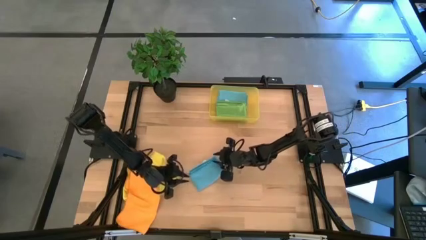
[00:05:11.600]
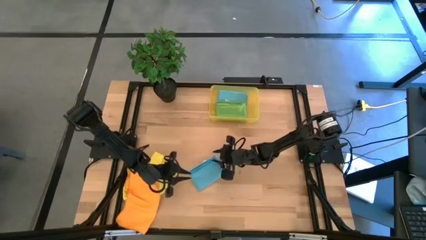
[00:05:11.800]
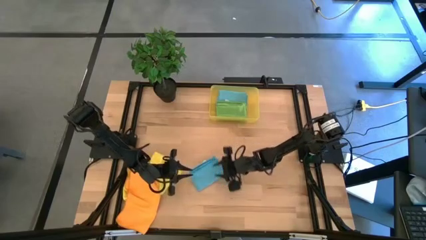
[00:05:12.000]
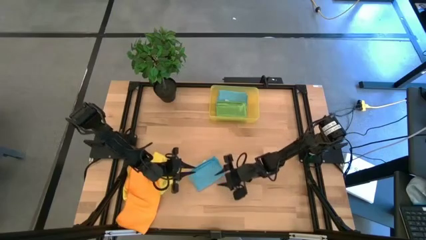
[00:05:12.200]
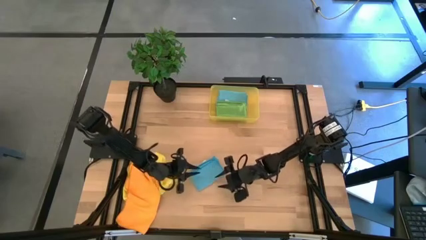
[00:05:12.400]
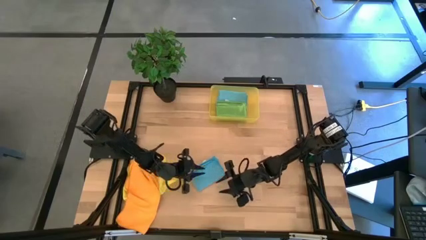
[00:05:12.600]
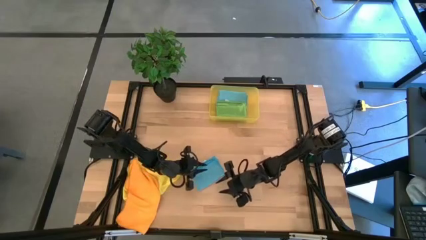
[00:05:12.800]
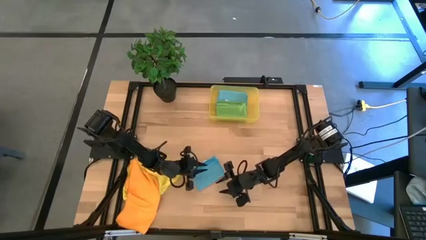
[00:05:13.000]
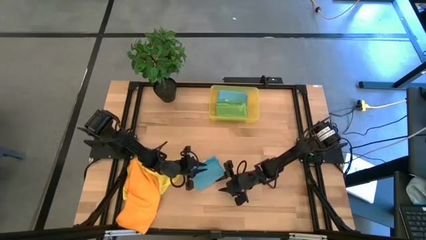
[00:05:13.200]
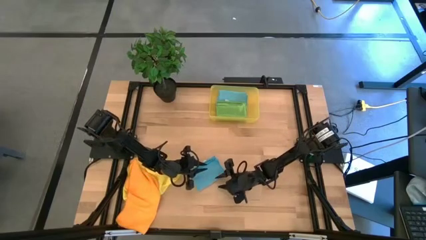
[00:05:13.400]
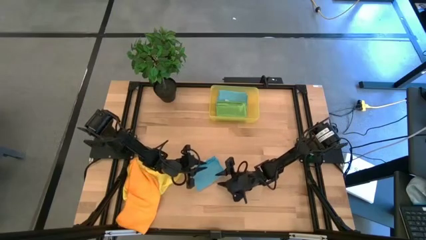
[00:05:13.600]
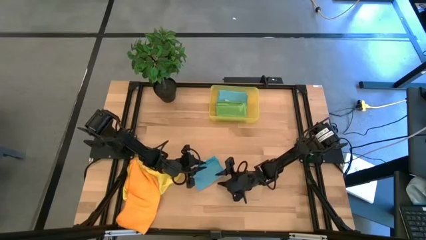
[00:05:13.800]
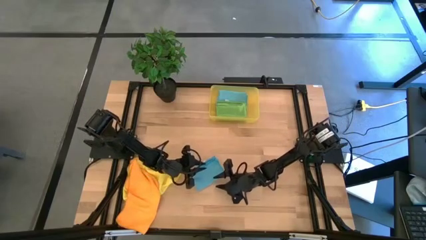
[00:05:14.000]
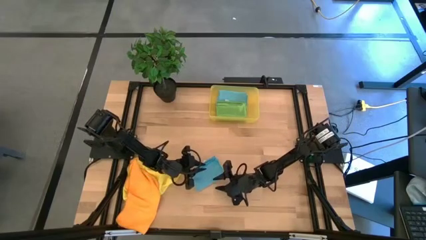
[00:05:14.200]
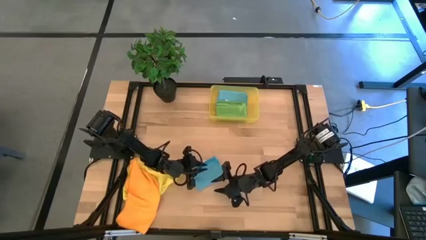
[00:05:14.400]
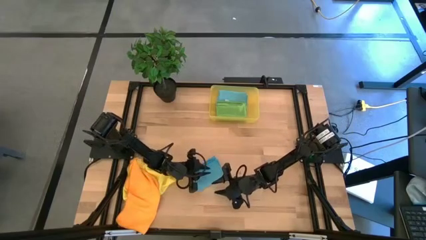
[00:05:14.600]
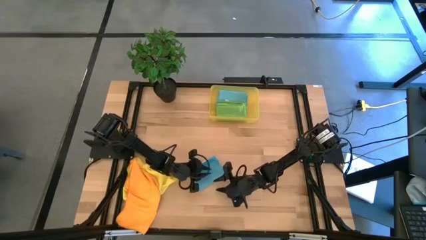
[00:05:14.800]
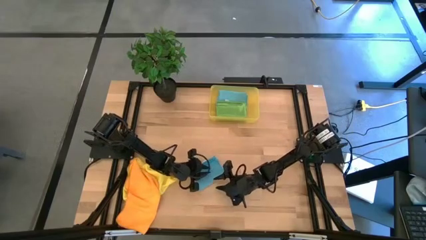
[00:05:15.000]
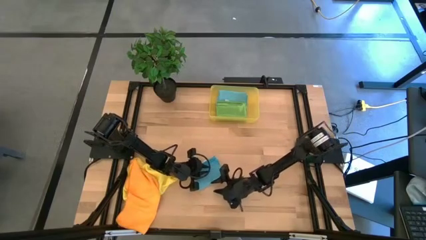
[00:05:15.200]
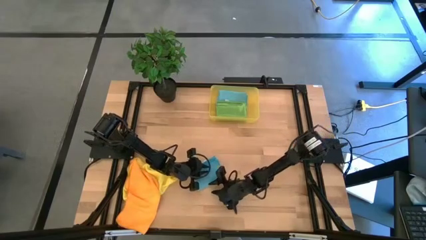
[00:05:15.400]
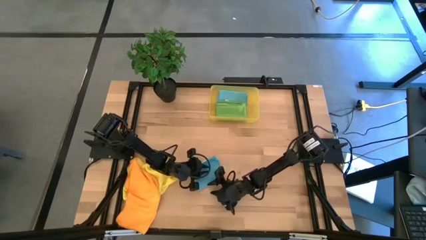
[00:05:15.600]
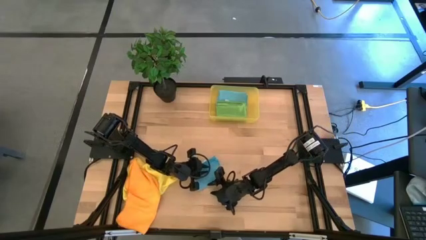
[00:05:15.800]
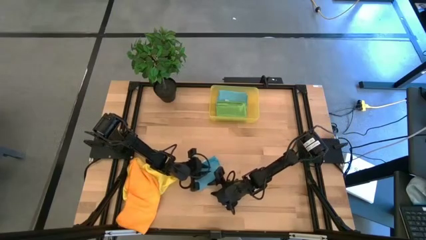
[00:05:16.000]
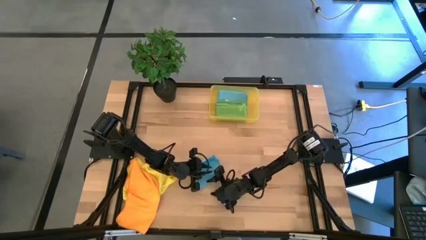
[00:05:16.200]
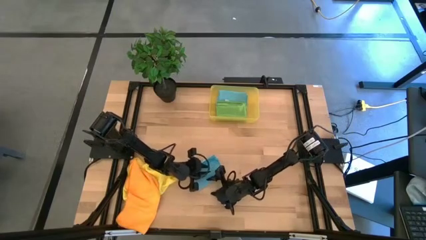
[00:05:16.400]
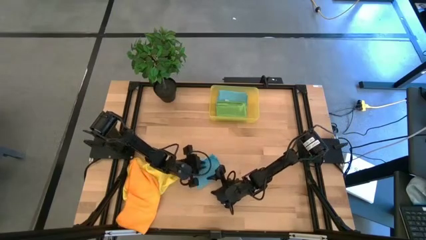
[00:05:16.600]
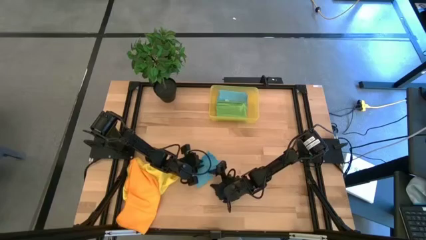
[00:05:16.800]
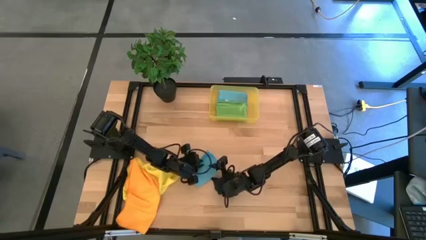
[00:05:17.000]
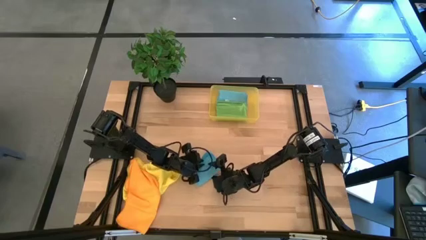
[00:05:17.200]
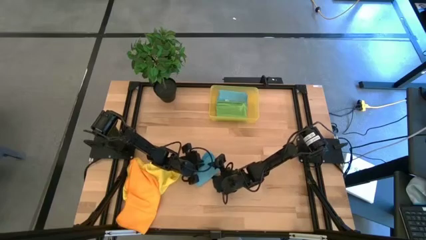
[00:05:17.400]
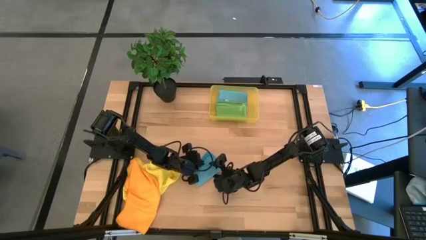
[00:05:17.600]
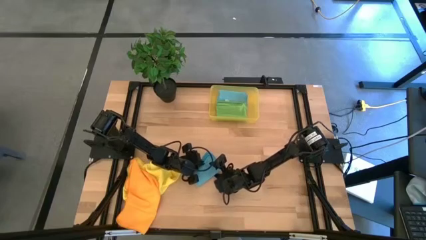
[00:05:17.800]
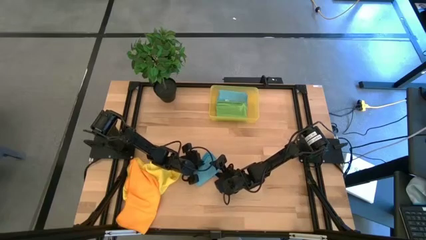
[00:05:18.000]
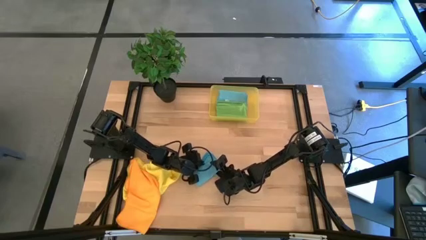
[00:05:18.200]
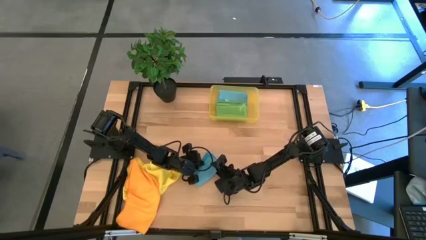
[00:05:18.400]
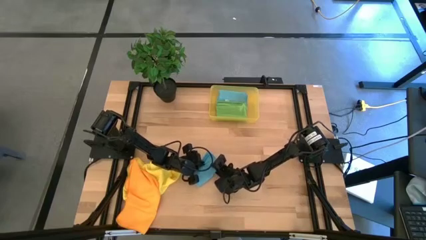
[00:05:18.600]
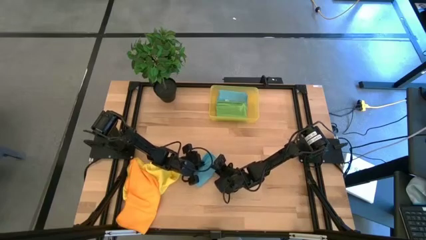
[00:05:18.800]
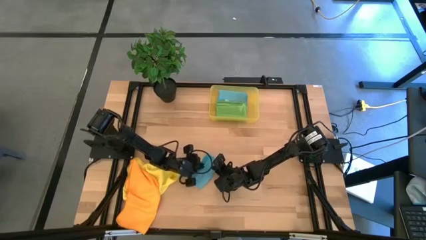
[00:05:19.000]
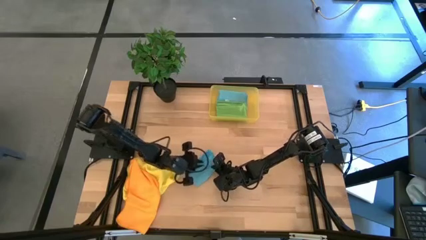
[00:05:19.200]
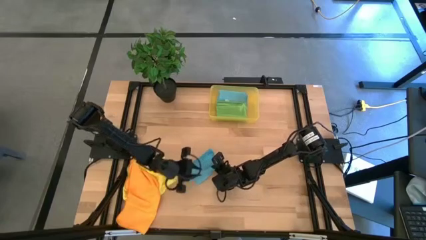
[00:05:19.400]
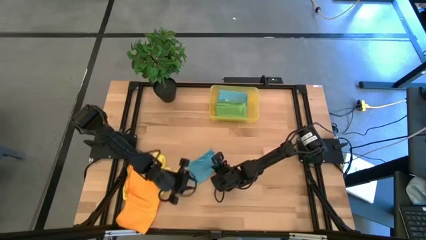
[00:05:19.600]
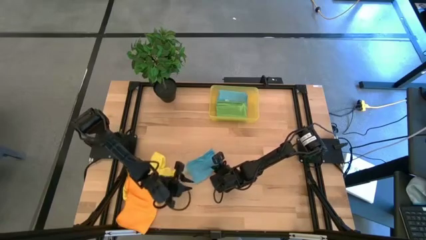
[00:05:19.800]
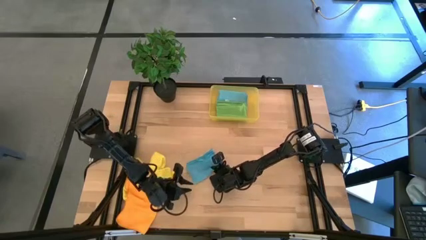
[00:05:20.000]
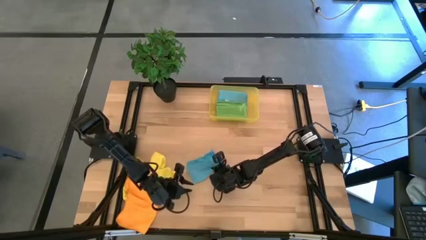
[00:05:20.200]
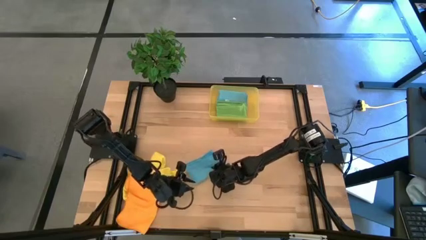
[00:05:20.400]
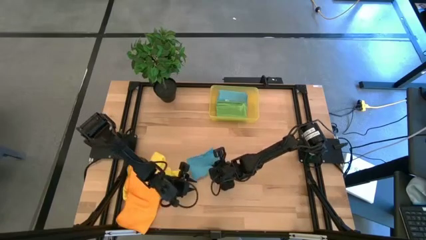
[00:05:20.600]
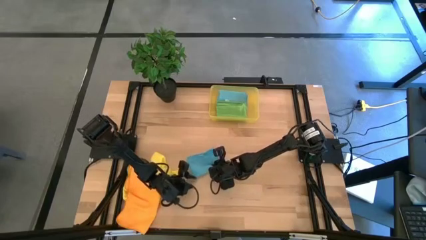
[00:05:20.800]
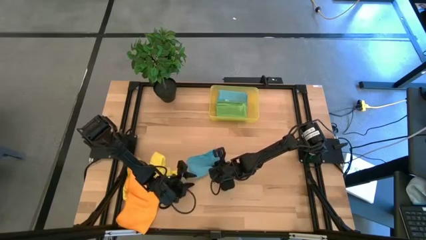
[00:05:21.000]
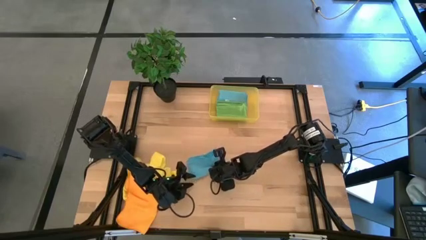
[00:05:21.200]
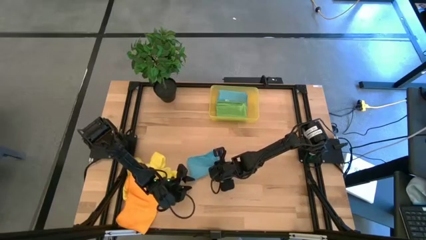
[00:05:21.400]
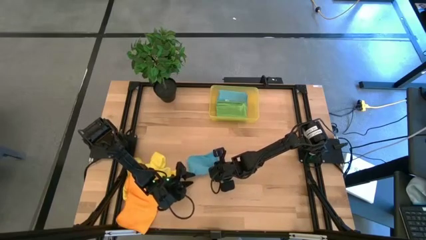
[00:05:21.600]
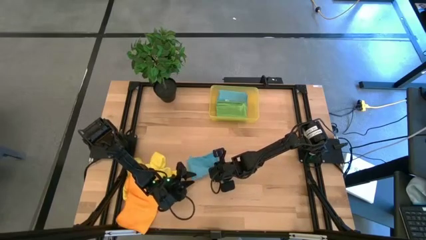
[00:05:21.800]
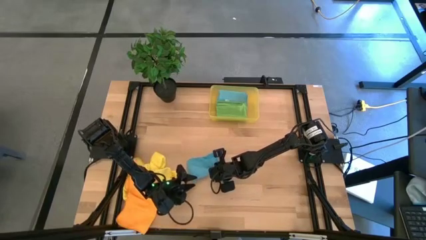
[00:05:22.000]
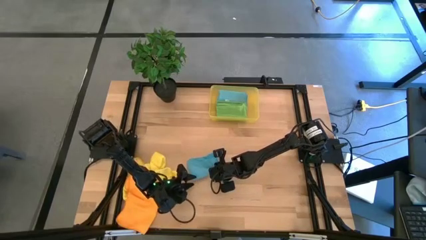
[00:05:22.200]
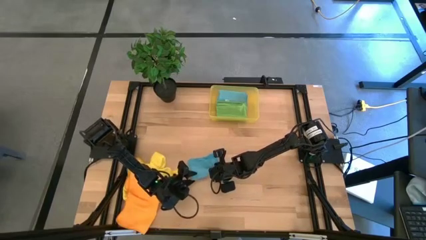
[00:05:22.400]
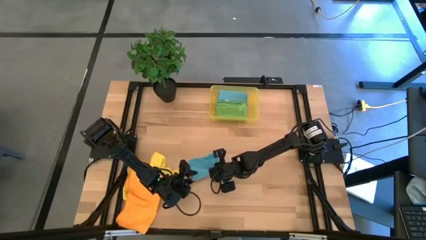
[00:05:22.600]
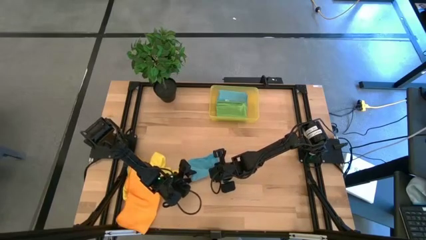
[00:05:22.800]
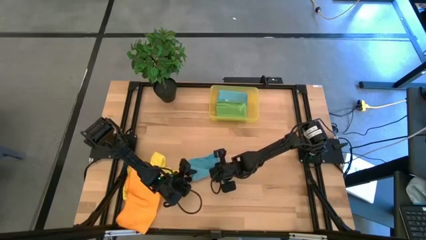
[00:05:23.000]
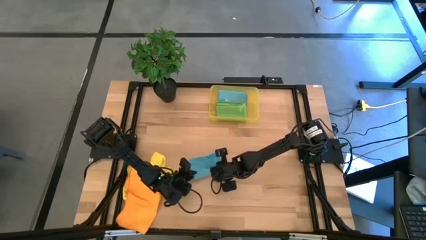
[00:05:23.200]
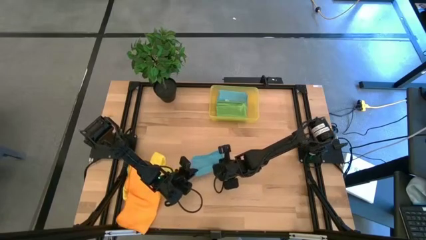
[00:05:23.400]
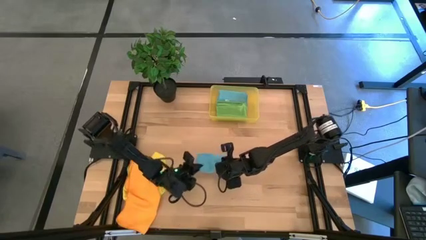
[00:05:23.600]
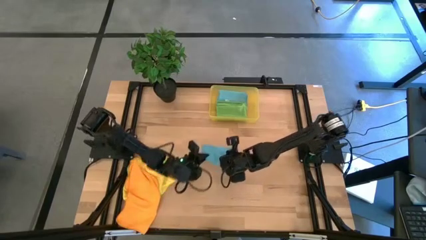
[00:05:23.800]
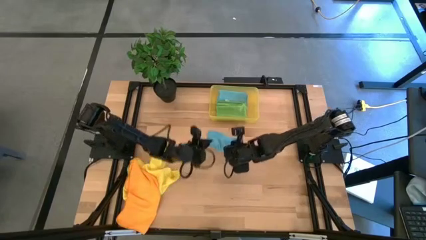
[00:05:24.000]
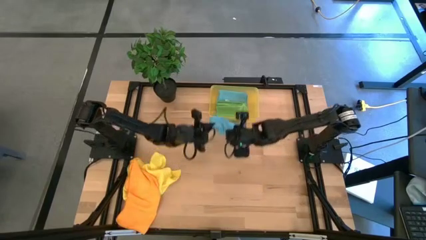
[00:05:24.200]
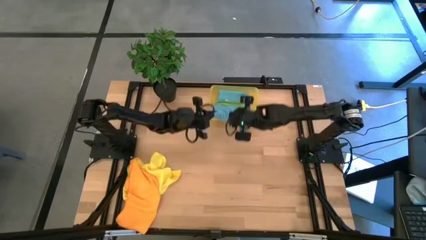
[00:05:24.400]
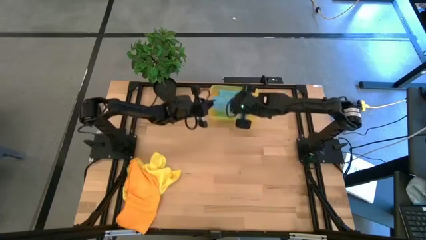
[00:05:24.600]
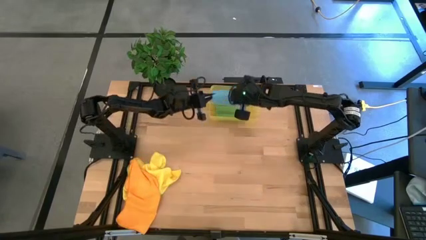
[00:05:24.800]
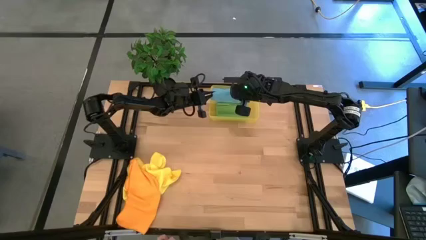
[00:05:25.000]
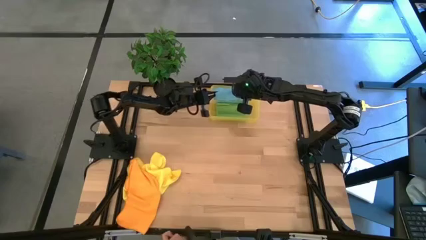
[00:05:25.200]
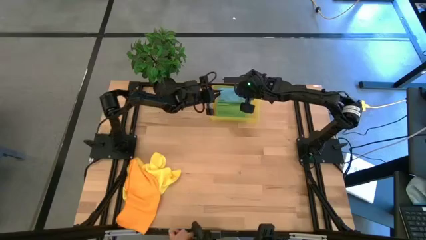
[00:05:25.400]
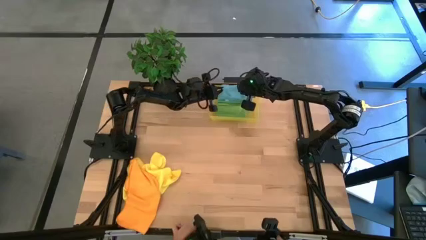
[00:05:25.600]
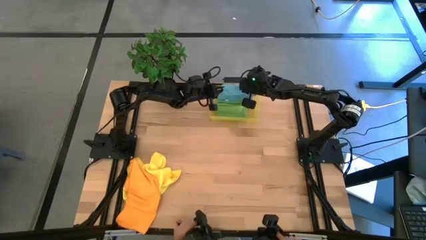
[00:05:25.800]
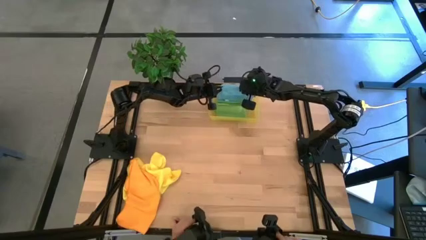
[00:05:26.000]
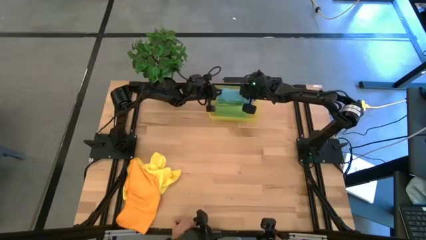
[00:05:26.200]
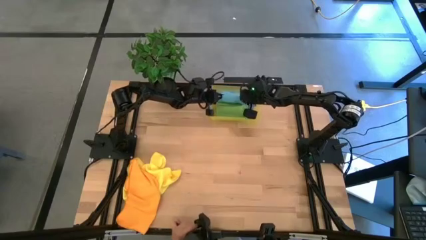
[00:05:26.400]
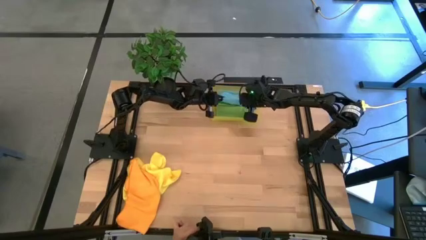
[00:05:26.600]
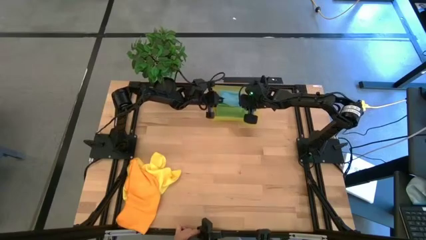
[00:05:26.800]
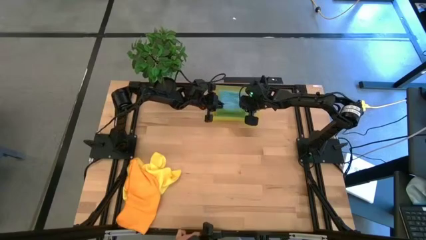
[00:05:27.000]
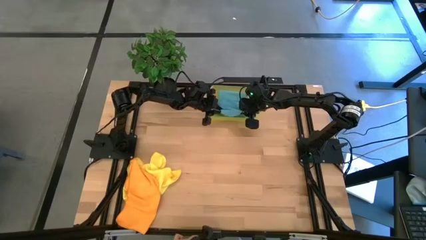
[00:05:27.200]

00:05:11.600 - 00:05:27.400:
Task: Fold microfiber towels
Put the folded blue microfiber towel into the yellow bin
